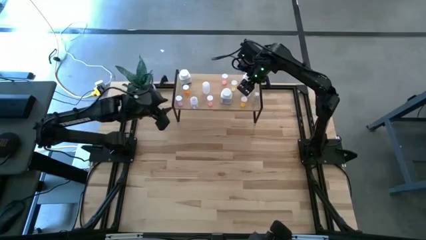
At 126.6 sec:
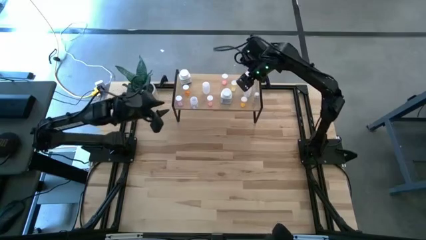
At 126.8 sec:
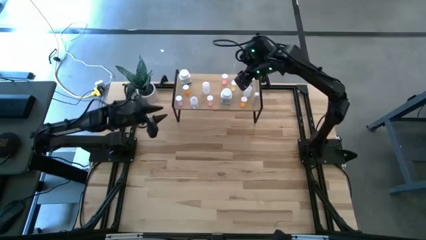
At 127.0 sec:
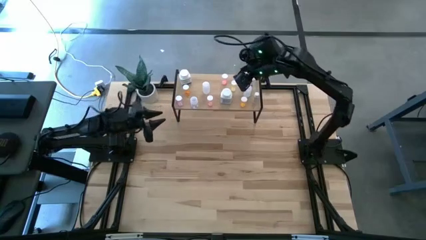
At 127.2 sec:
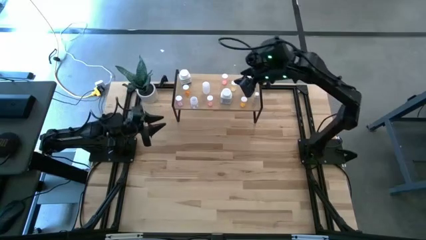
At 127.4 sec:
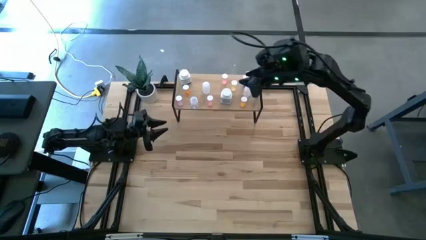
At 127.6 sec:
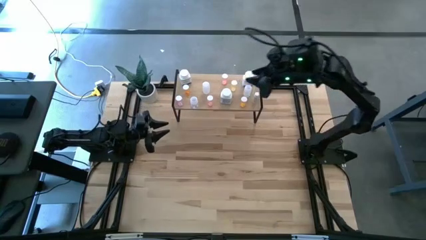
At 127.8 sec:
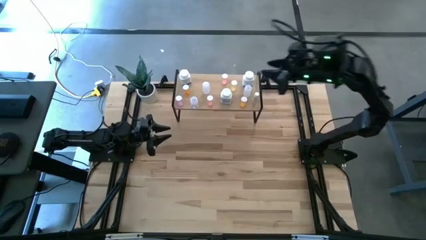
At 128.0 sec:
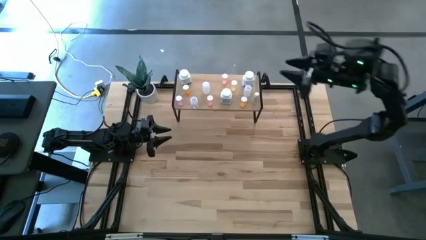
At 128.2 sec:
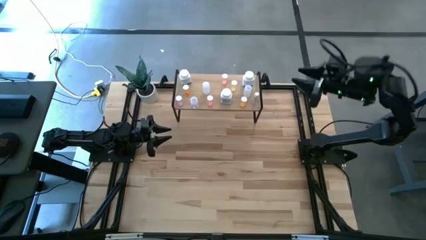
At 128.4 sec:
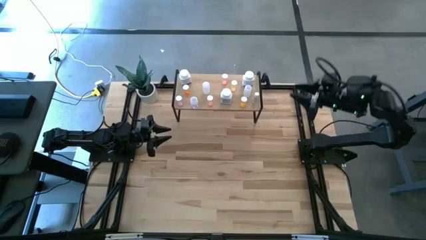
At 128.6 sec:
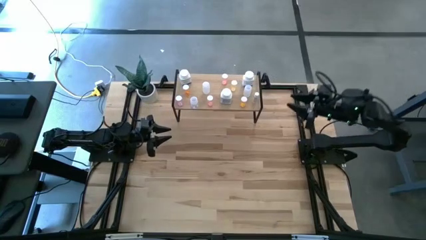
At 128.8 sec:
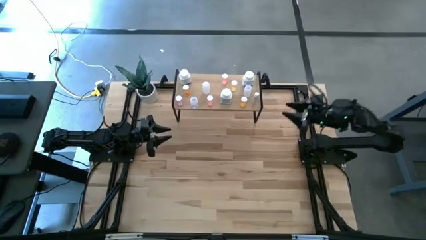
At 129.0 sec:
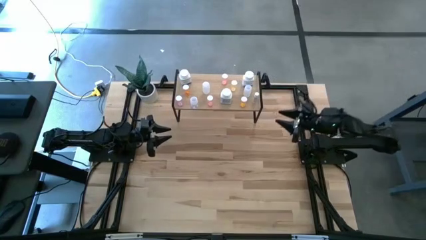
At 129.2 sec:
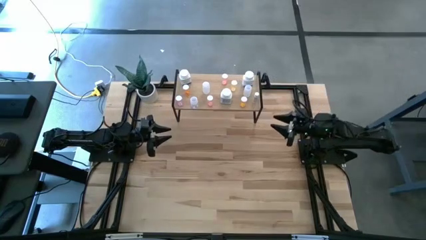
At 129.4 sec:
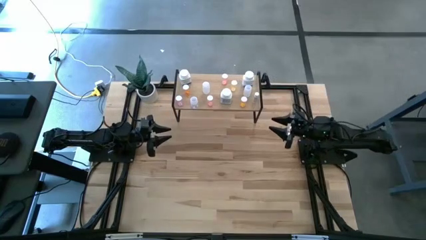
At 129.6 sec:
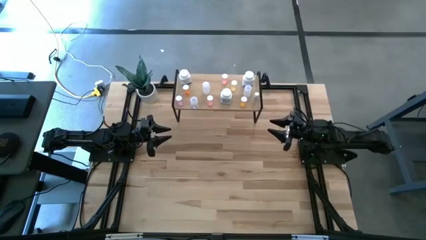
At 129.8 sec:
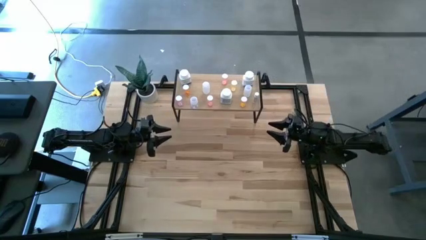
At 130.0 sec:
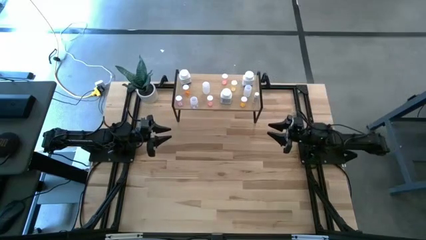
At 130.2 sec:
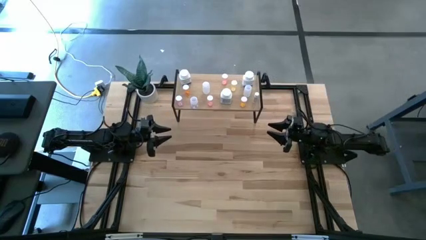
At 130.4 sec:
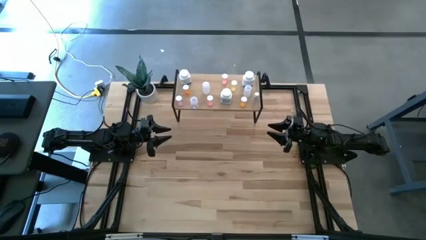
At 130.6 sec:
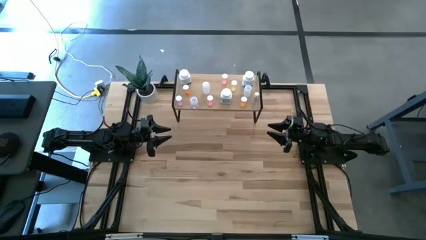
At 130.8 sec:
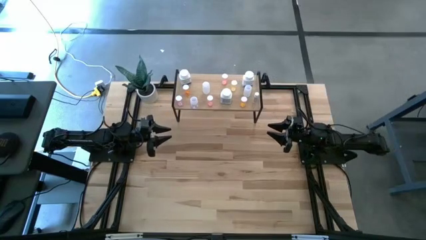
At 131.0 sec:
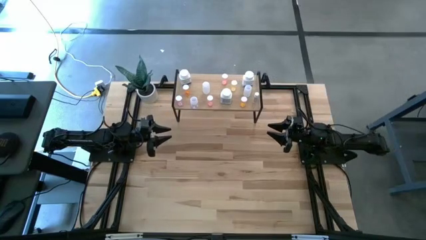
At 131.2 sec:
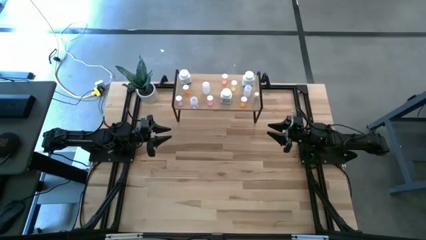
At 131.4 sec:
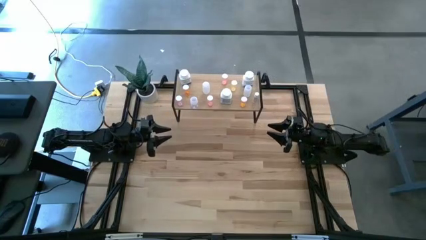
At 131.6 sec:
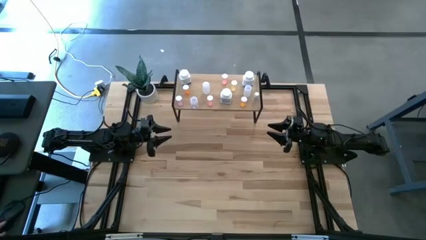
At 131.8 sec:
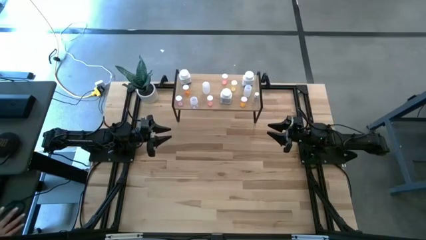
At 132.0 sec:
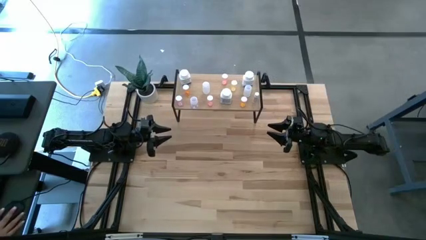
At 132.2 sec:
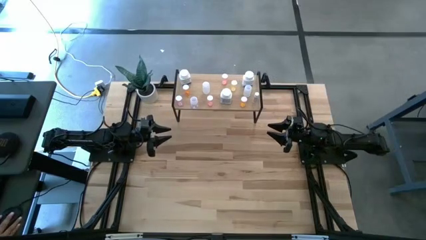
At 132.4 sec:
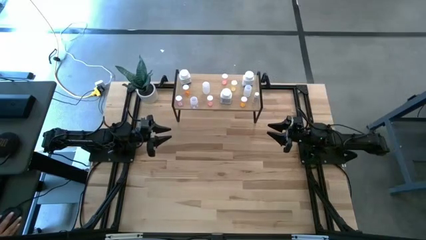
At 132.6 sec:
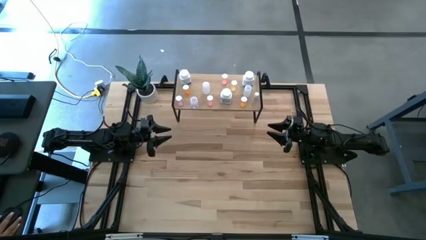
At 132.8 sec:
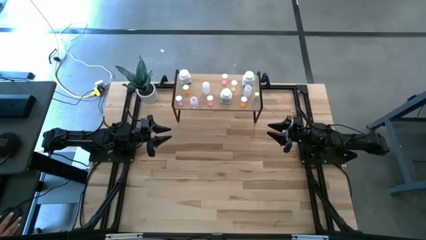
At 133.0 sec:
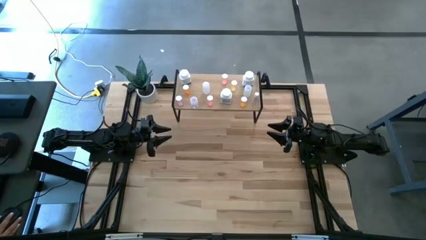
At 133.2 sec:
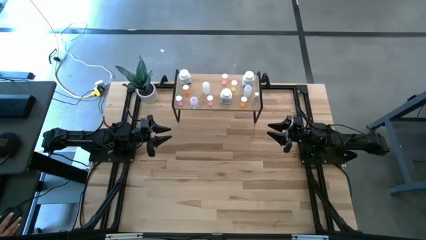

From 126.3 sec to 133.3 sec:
Task: Pick and place medicine bottles onto shelf by color
Return to Home Position

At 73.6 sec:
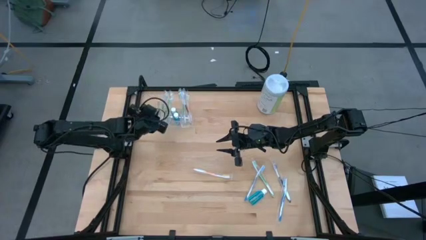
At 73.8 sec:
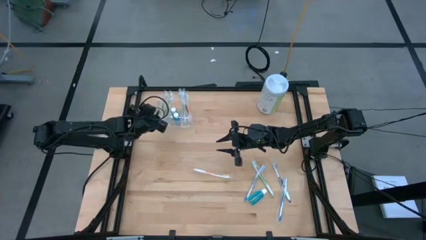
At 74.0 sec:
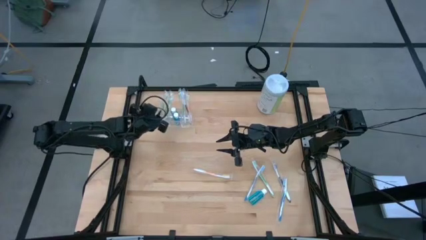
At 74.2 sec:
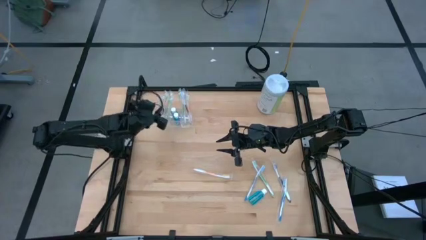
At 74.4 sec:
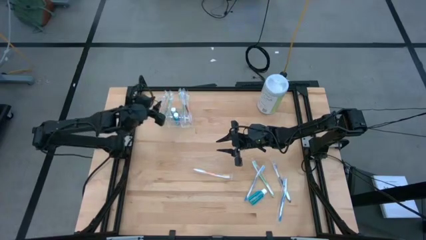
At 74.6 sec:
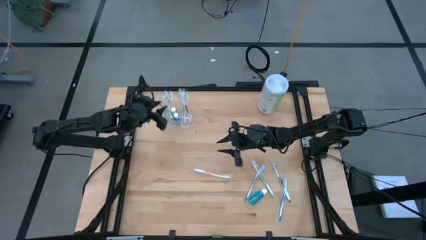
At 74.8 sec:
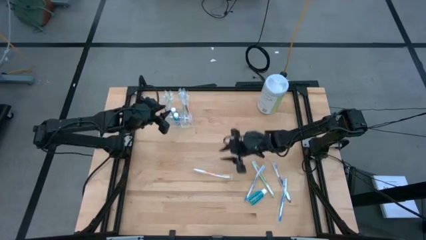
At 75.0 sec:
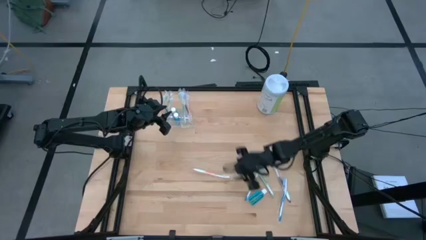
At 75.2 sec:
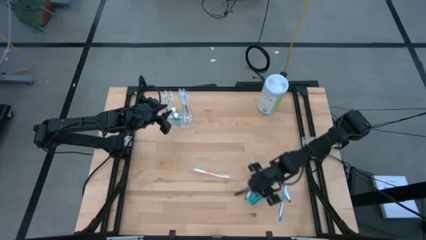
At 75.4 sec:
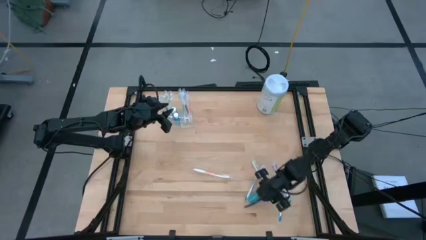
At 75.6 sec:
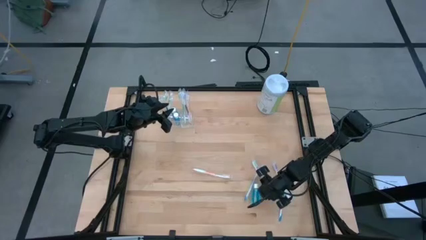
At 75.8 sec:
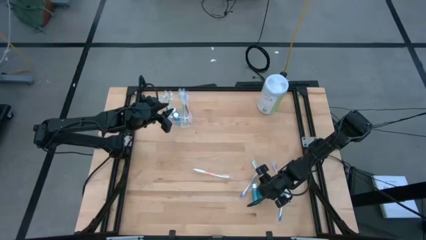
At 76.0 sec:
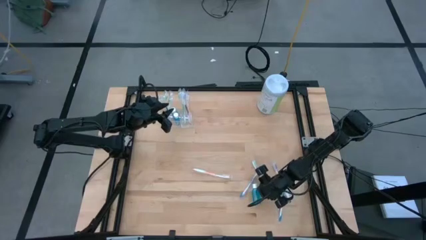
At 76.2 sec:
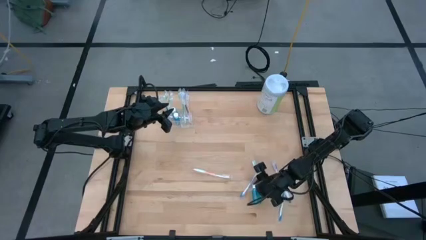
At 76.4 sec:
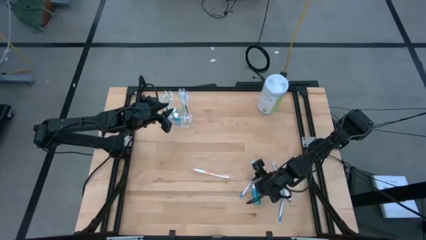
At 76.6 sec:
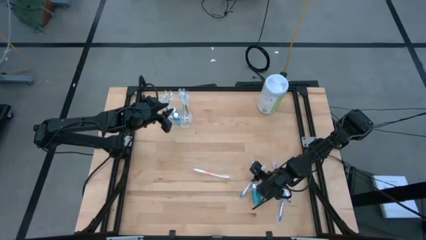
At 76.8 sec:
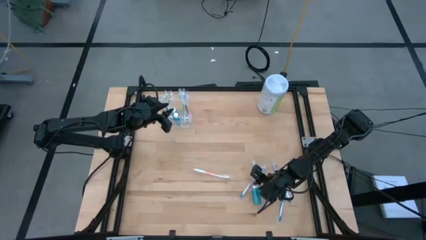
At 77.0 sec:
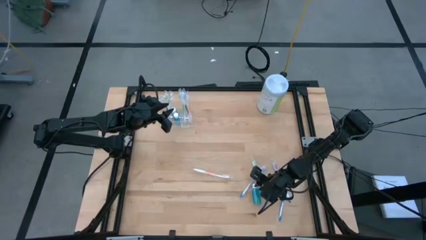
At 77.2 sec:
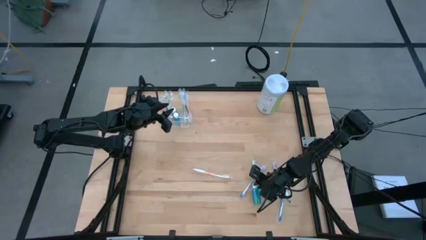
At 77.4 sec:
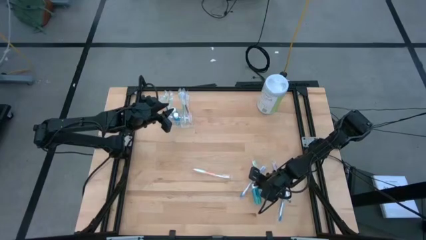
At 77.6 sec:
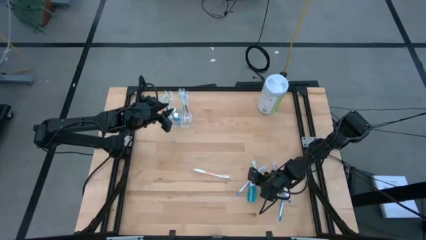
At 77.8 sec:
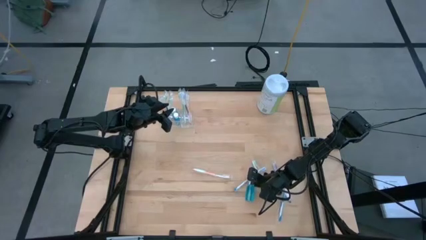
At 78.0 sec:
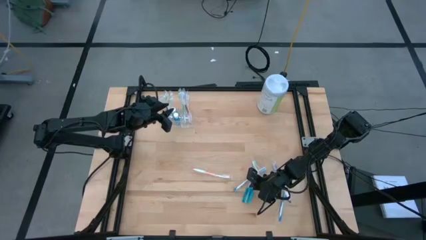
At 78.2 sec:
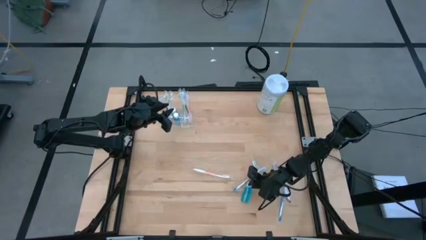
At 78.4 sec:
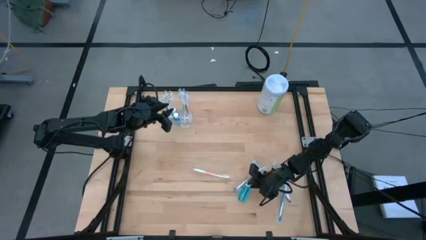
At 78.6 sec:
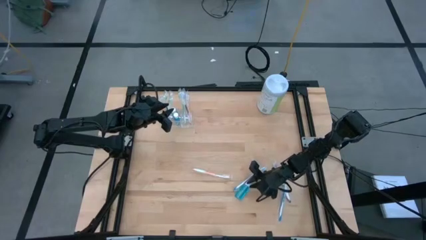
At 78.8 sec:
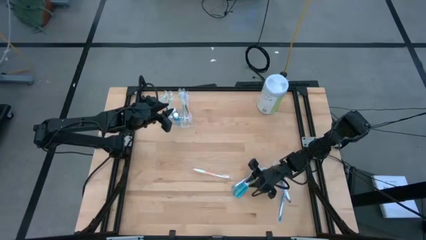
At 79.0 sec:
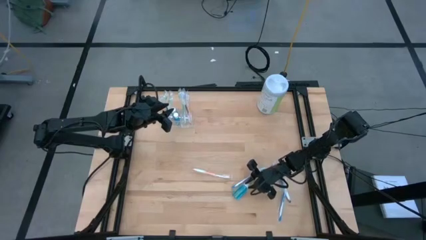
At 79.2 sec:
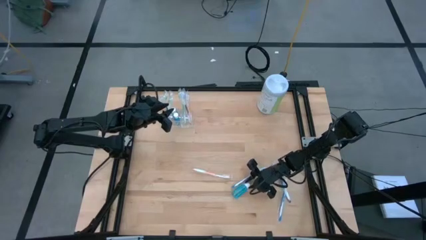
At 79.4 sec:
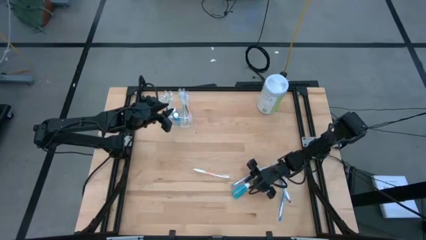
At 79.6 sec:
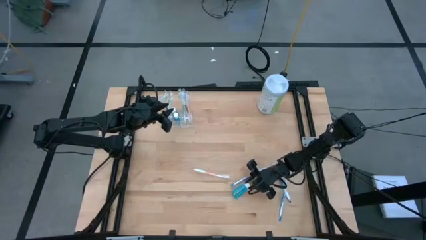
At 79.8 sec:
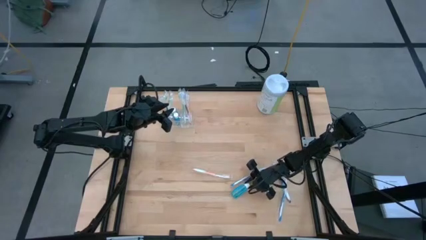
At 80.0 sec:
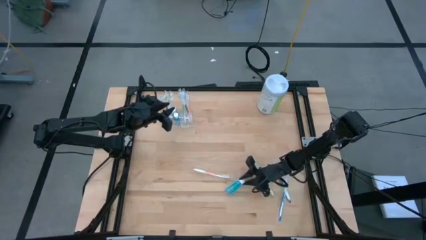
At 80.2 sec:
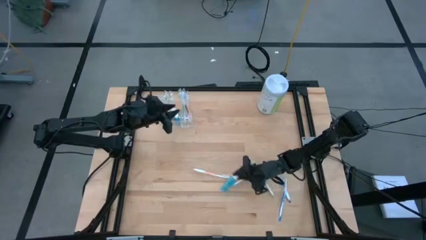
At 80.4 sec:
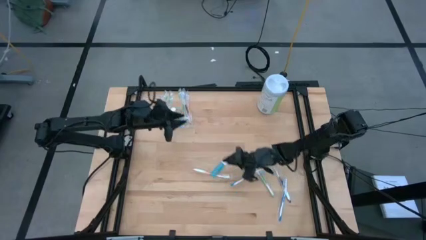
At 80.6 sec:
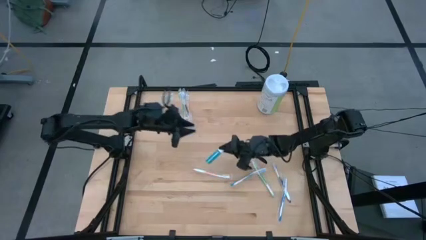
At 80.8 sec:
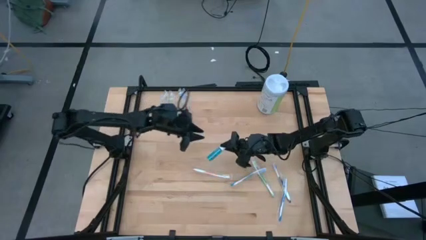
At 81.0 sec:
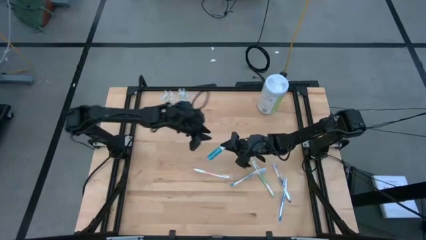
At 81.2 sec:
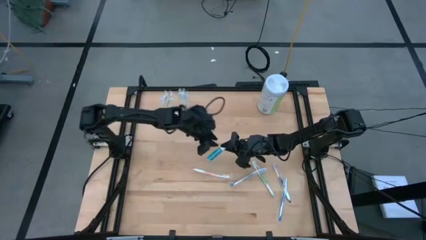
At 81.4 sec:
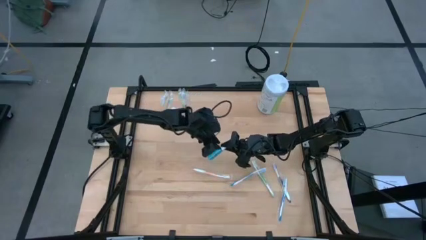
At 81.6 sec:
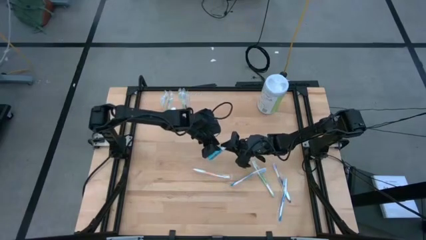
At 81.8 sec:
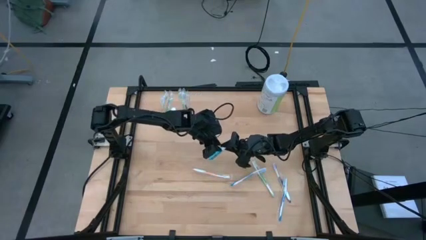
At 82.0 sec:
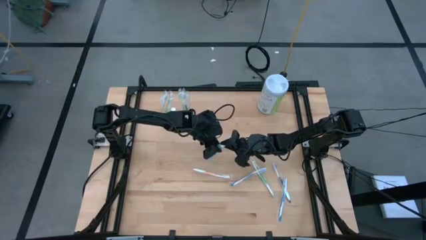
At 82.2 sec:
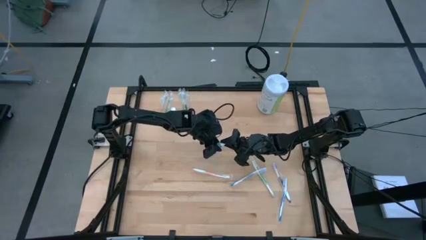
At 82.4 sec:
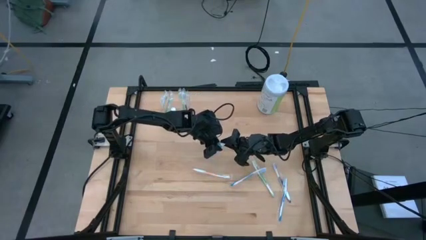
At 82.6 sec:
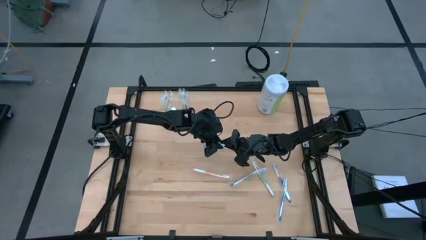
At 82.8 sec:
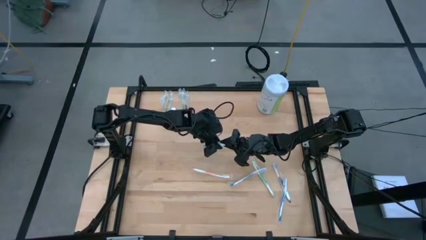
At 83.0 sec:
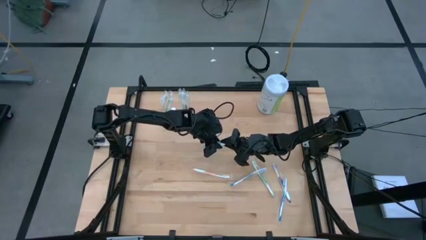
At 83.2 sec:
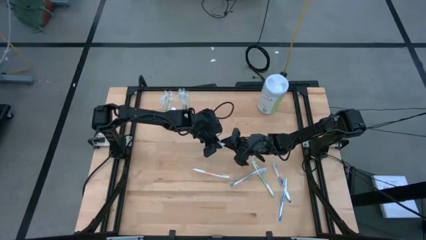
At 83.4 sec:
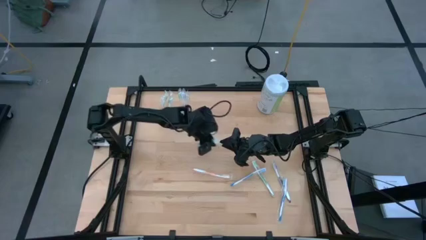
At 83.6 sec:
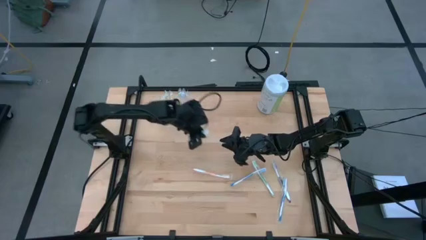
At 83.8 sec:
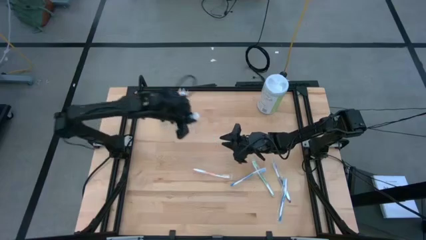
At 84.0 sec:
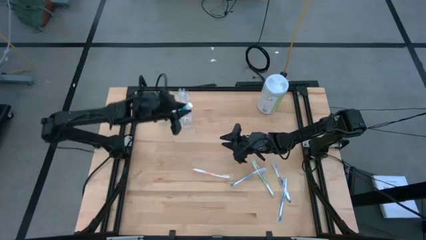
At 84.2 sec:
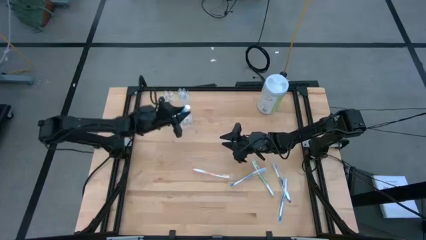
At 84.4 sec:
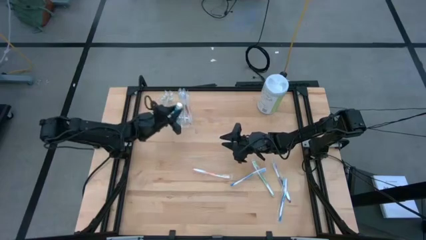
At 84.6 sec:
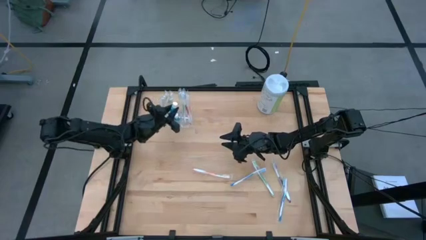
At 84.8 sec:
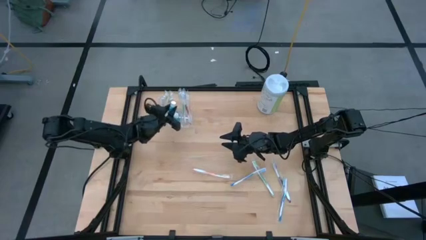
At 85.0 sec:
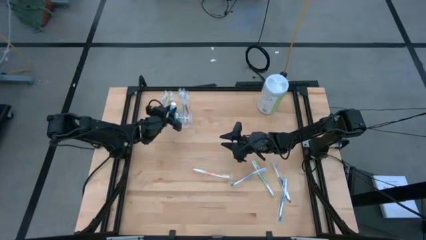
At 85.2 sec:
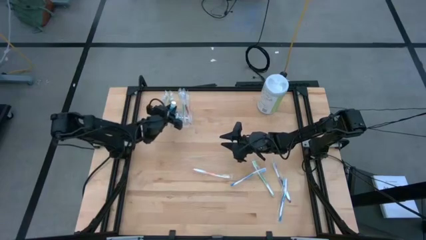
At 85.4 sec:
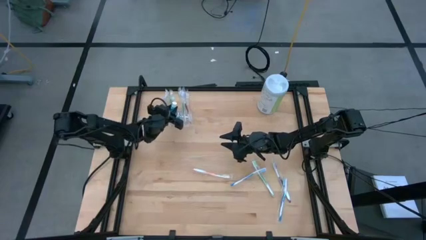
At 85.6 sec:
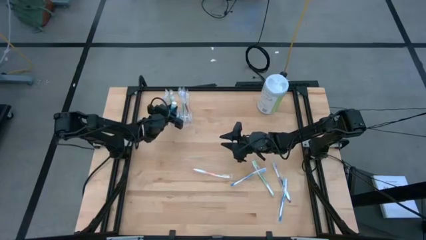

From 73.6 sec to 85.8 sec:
Task: Pick & Place toothbrushing station
Put the blue mouthwash into the transparent organizer
